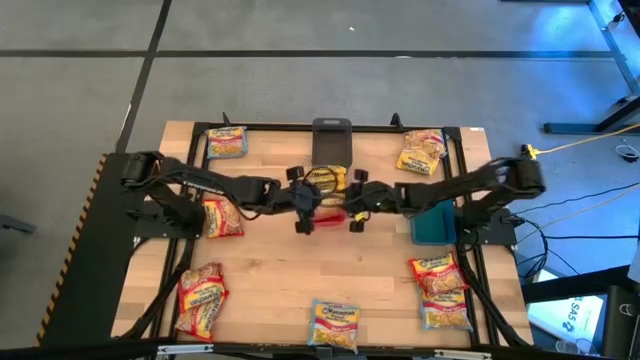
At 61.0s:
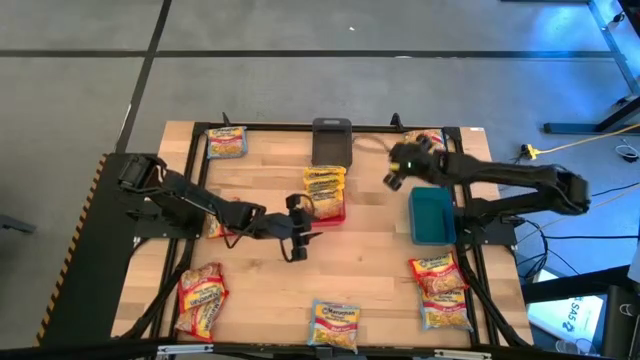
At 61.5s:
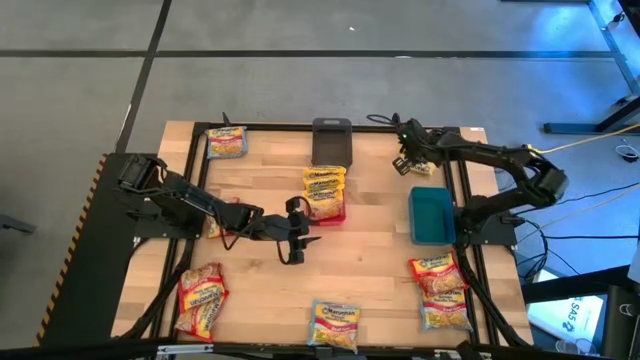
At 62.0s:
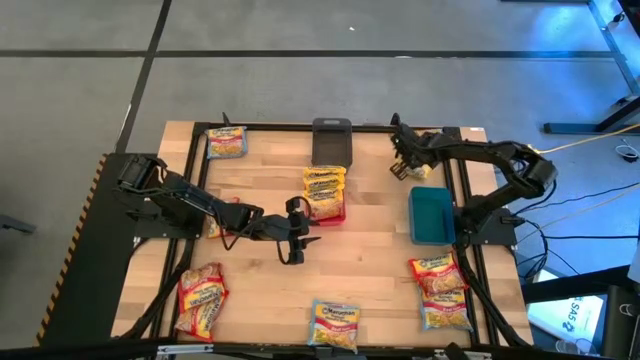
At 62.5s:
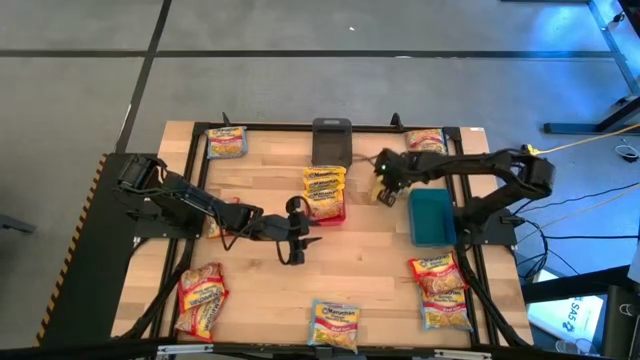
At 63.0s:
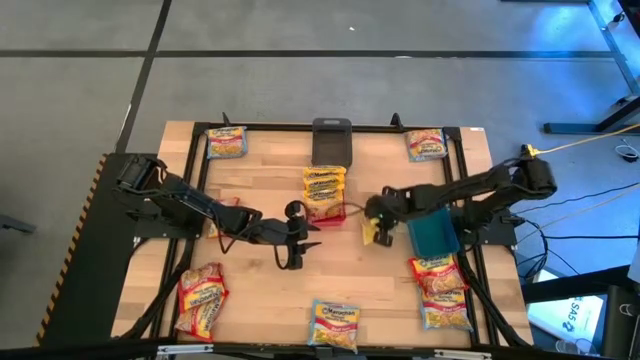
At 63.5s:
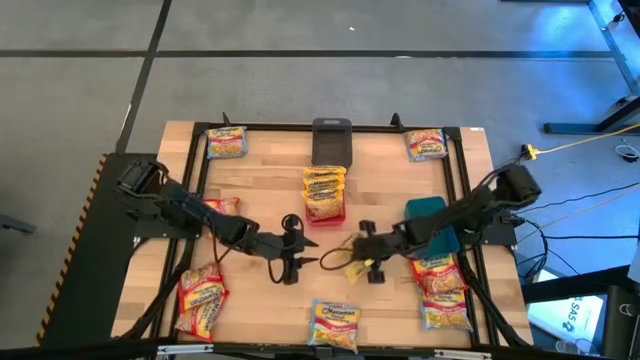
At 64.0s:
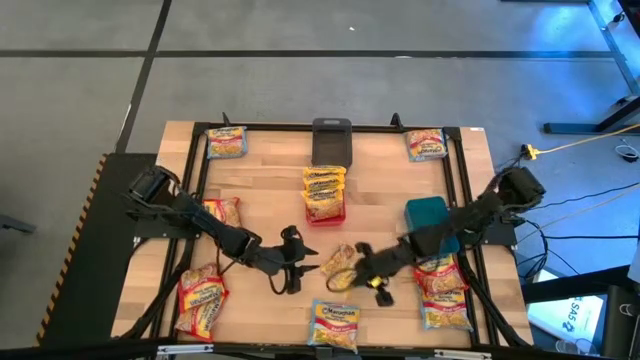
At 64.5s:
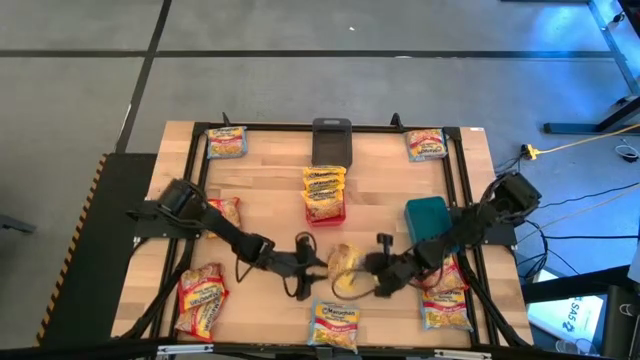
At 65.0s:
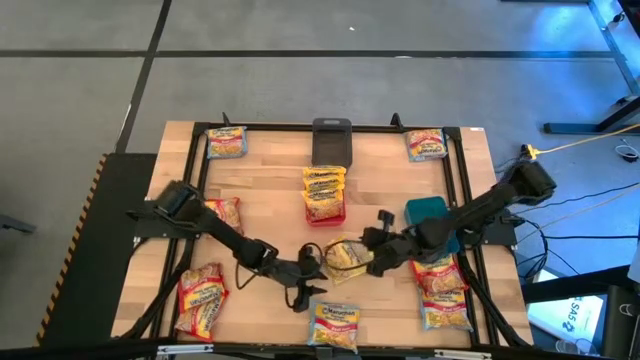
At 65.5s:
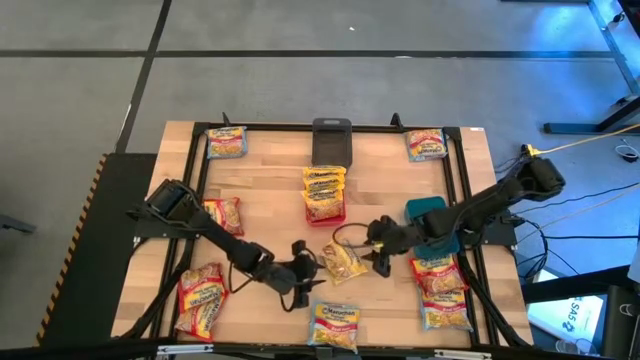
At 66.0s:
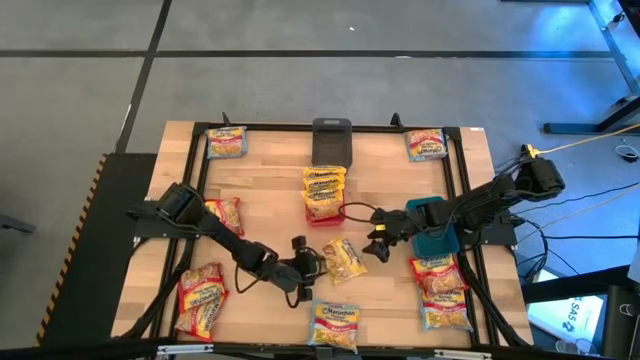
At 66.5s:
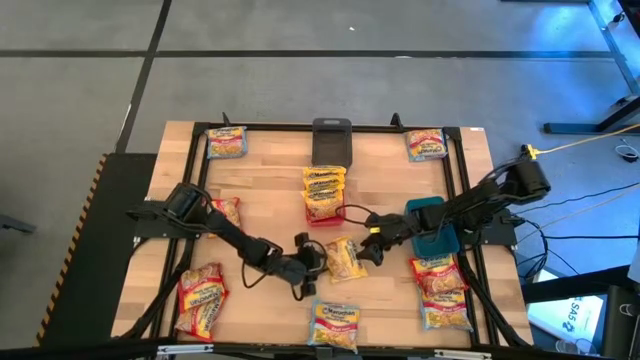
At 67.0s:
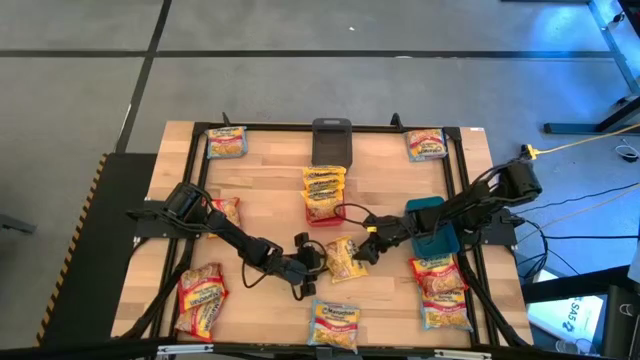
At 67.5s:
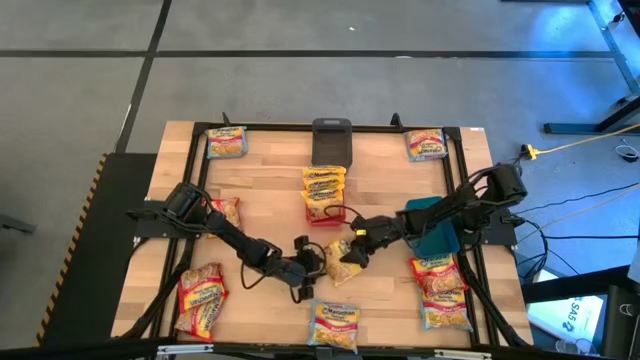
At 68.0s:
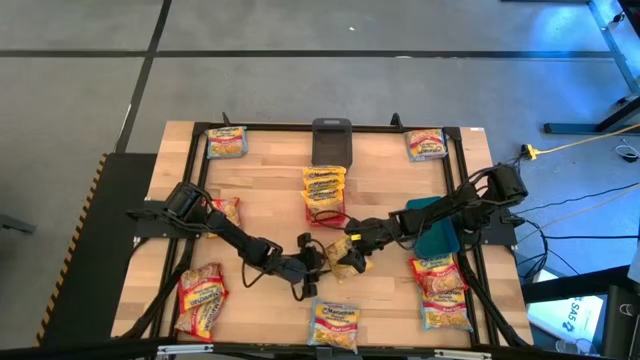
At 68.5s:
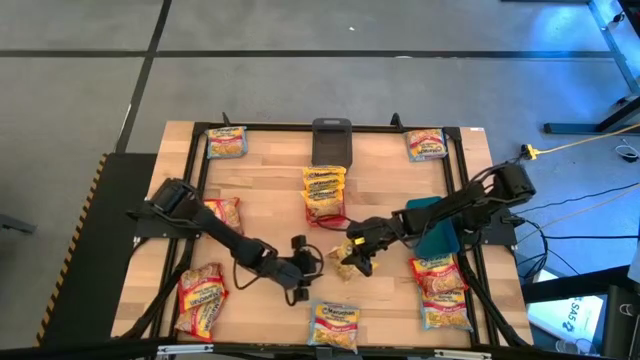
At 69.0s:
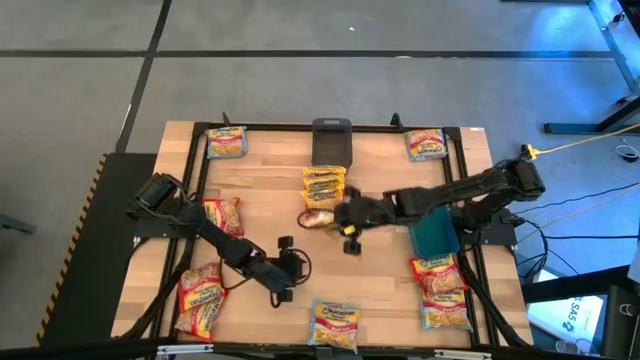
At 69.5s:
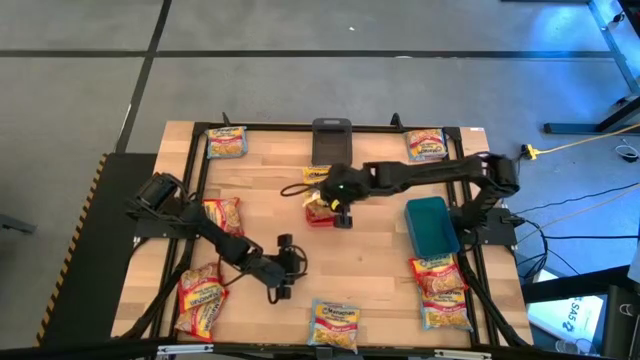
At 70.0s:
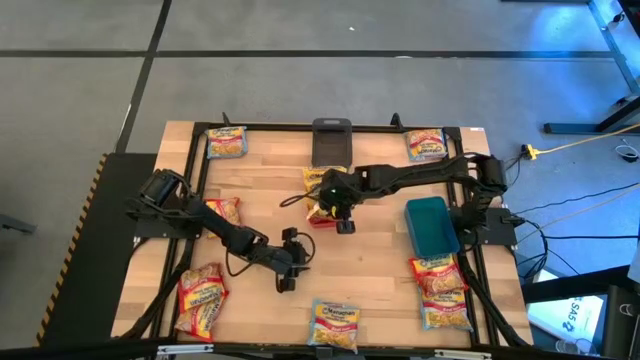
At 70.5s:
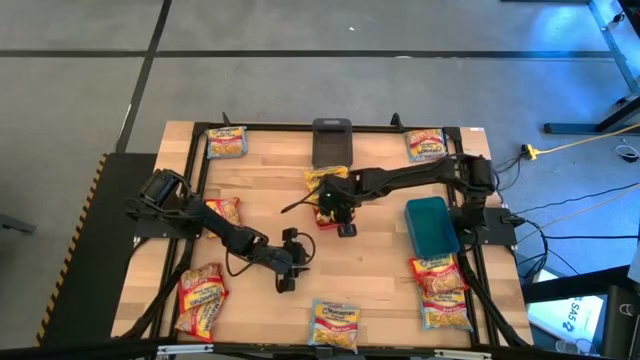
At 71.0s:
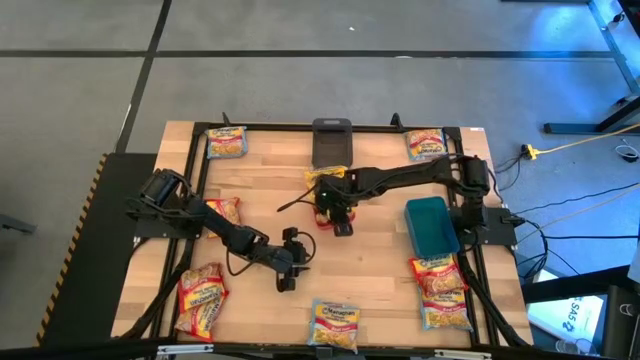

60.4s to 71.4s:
Task: Sort Maruchan noodles
Put the yellow noodle pack into the red bin

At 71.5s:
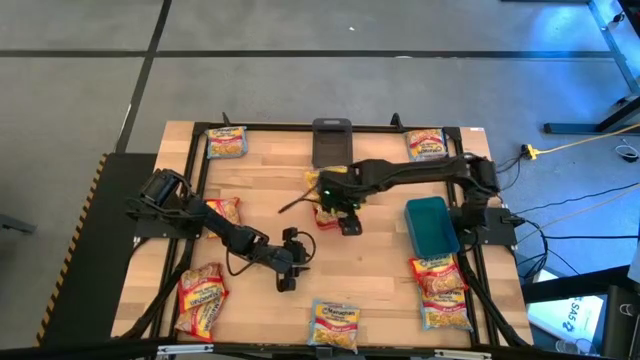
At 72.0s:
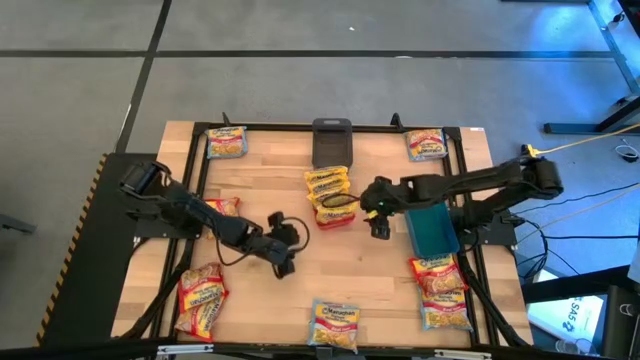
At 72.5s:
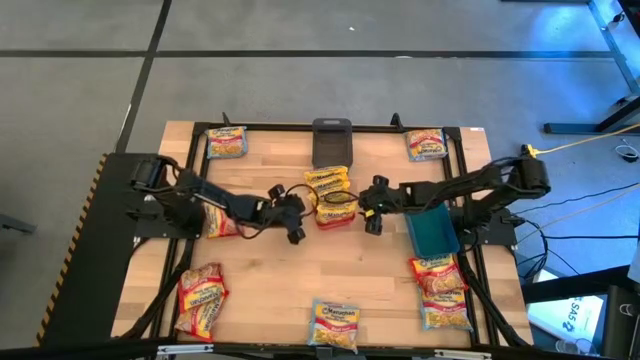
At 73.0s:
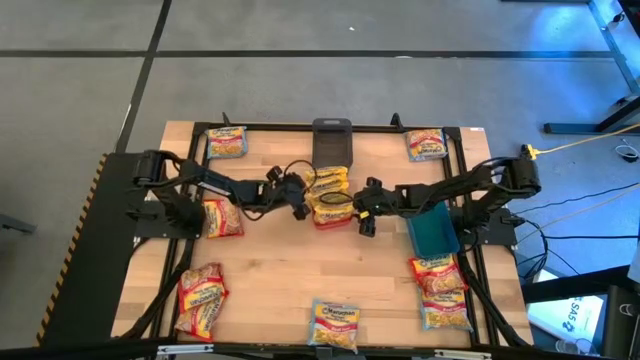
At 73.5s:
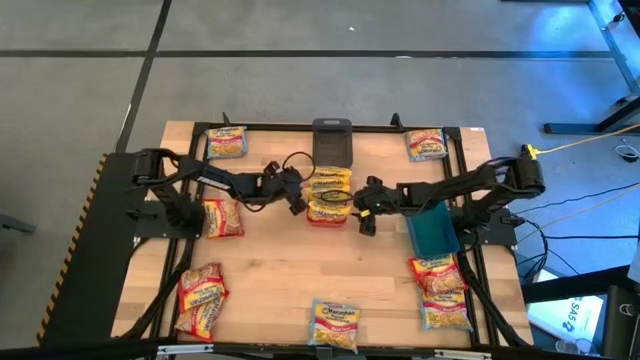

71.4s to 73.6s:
Adjust the red bin

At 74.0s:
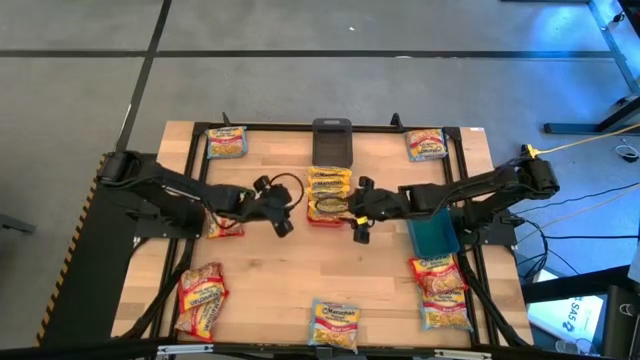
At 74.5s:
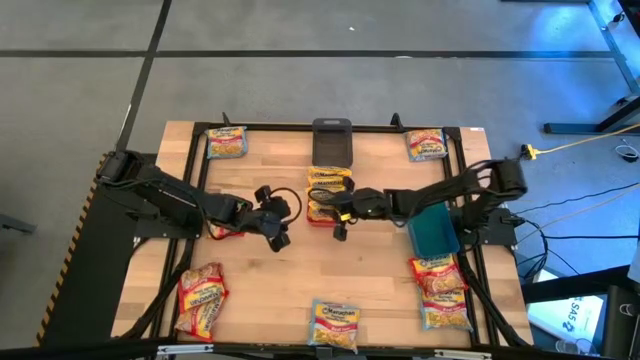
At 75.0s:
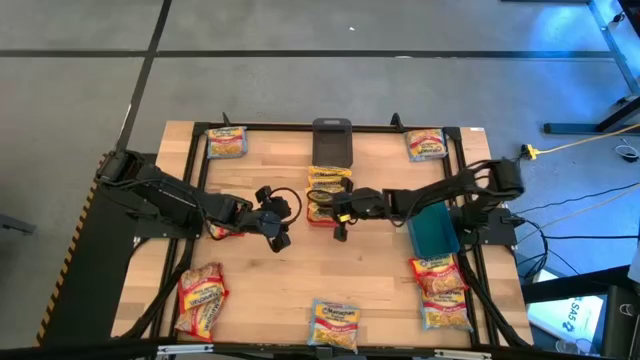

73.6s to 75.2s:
Adjust the yellow noodle pack in the red bin

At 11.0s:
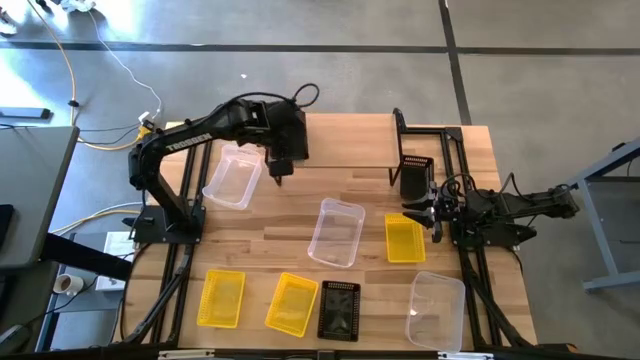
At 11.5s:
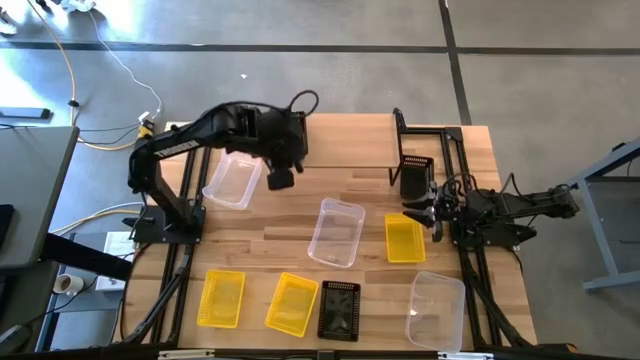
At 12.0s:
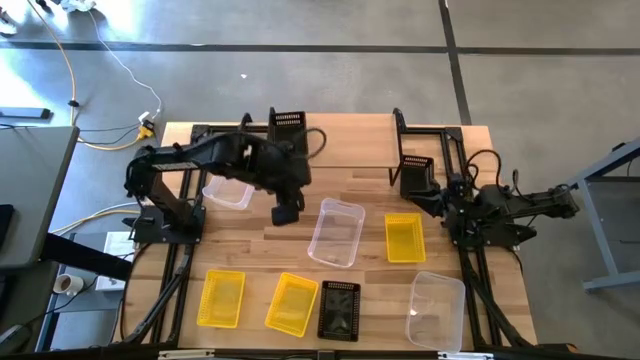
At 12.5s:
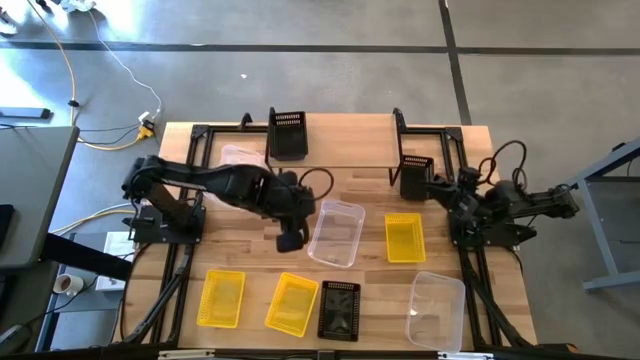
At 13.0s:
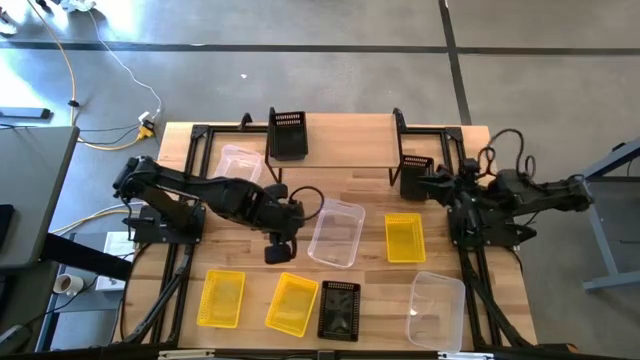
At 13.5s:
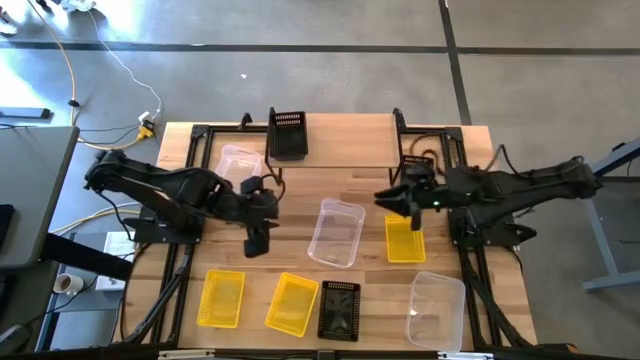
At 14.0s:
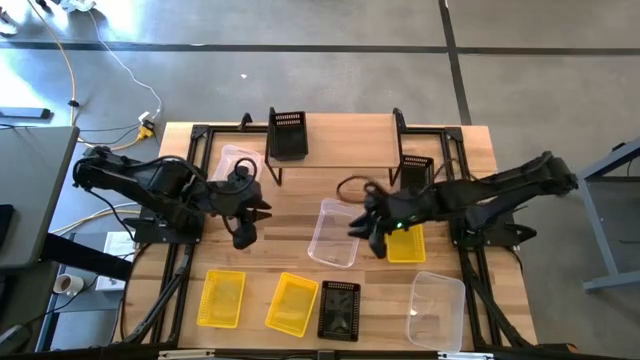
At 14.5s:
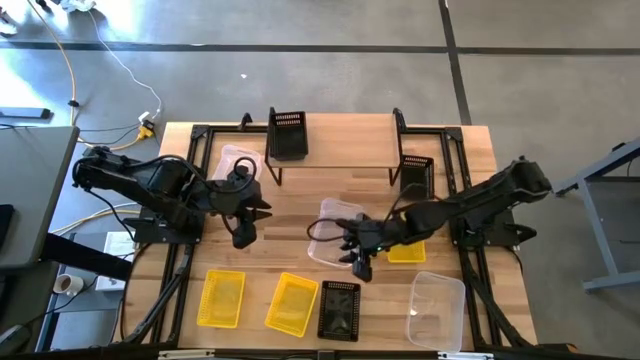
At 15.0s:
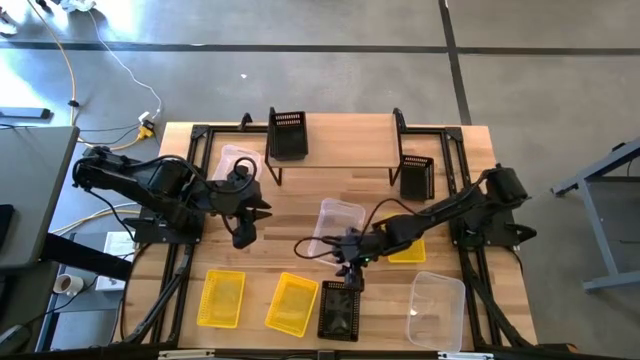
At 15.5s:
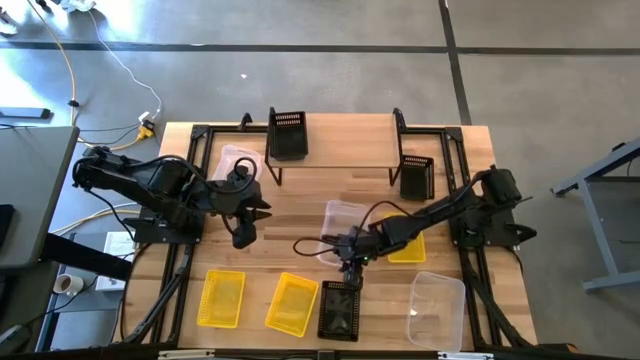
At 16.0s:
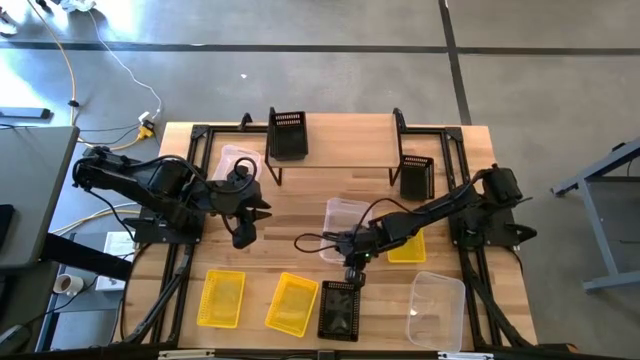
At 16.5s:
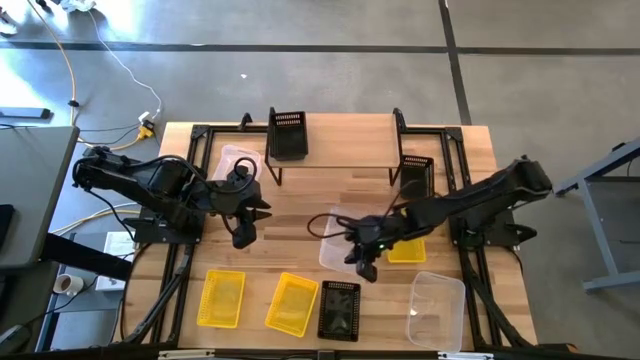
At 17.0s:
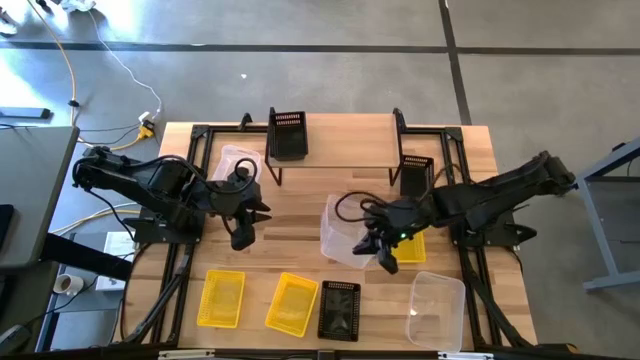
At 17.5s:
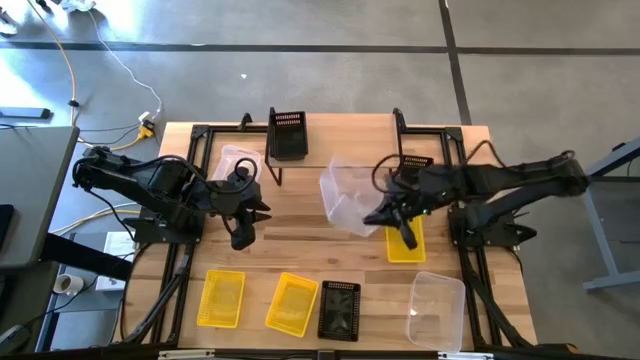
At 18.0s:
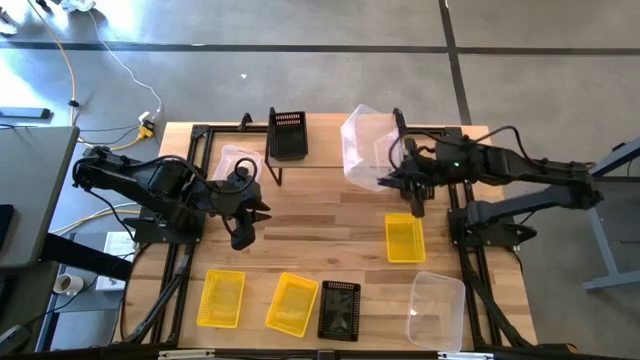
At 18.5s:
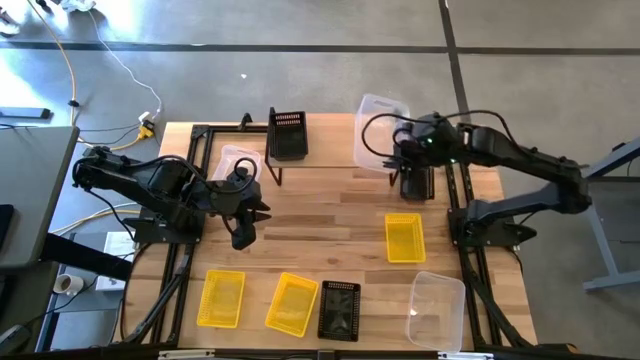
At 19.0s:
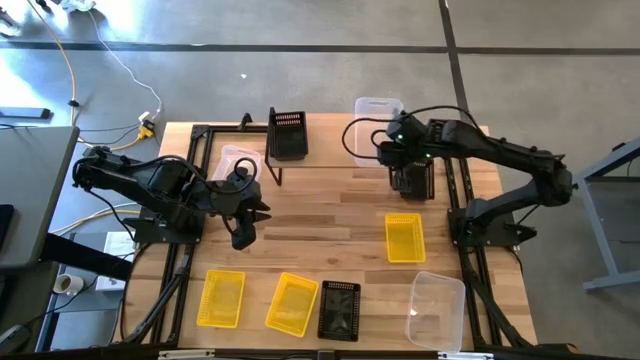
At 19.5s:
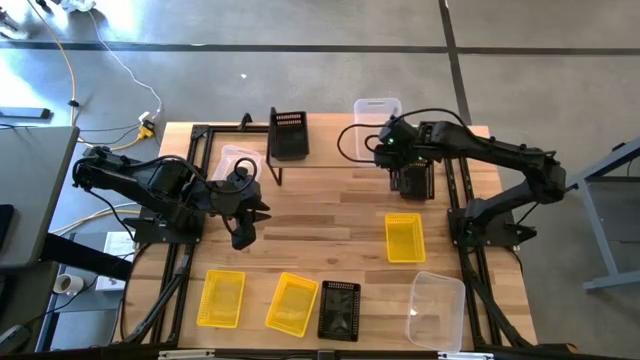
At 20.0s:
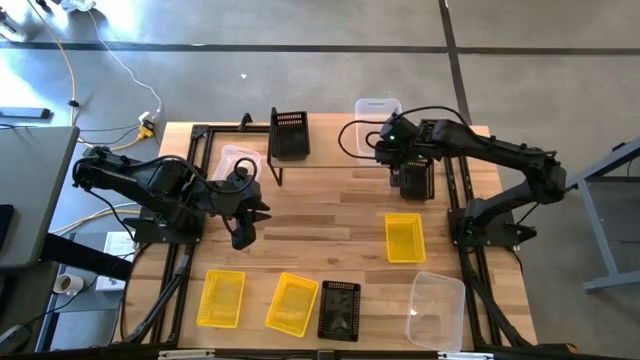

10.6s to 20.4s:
Task: Stack baskets on shelf by color
Put the center transparent bin on the shelf
